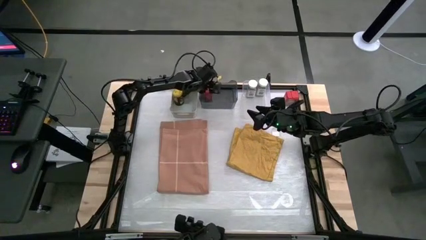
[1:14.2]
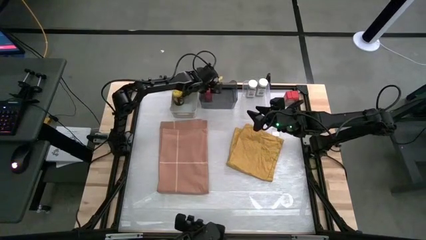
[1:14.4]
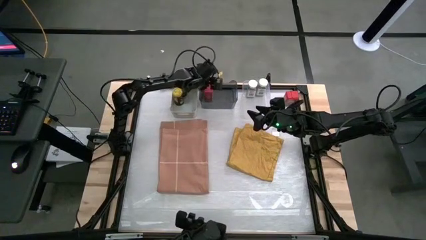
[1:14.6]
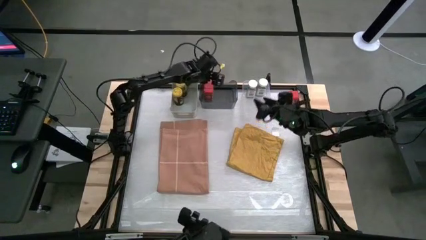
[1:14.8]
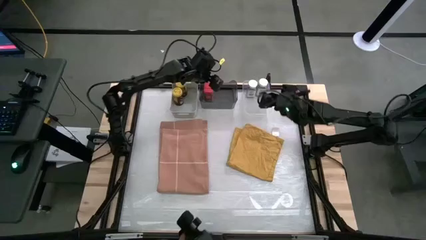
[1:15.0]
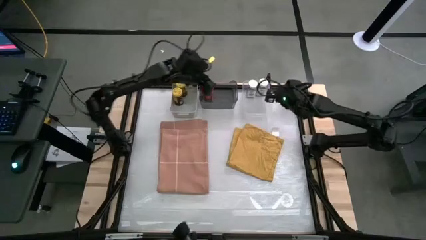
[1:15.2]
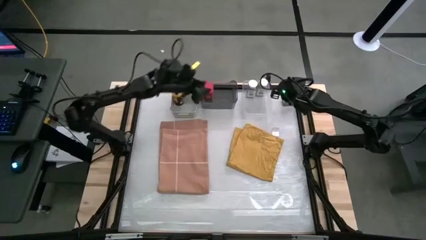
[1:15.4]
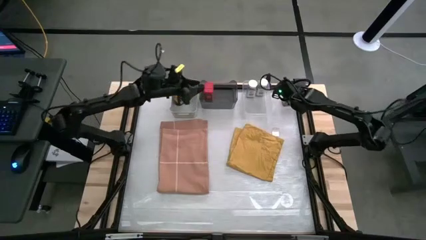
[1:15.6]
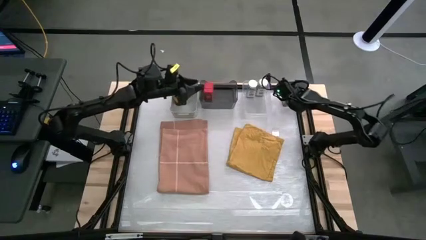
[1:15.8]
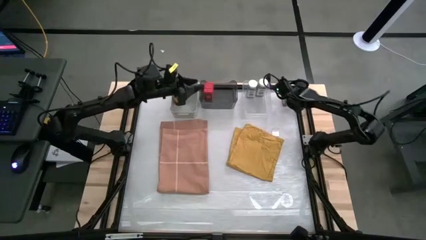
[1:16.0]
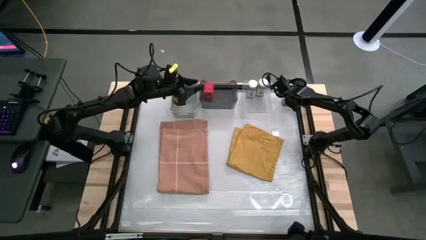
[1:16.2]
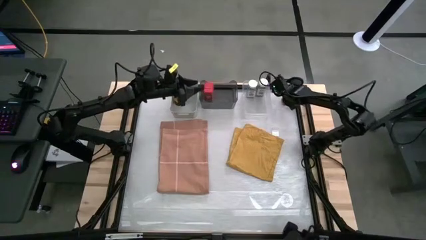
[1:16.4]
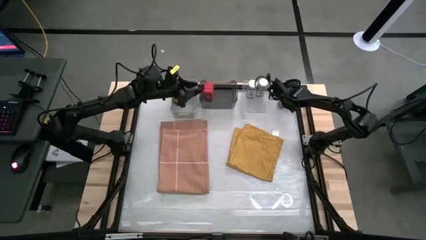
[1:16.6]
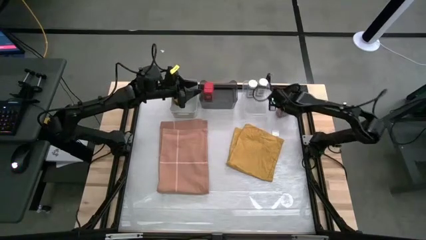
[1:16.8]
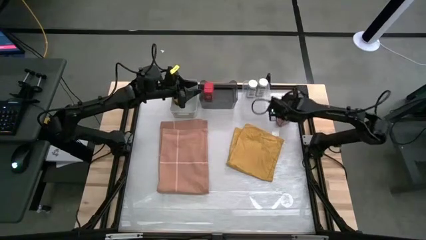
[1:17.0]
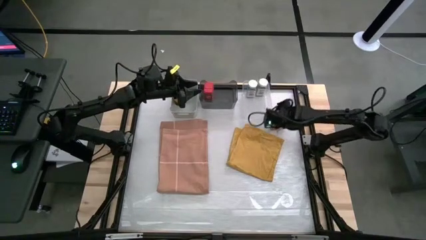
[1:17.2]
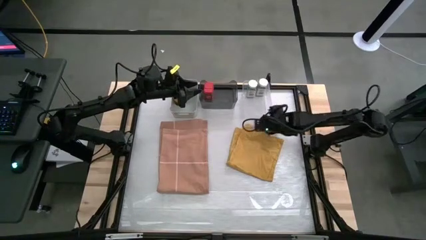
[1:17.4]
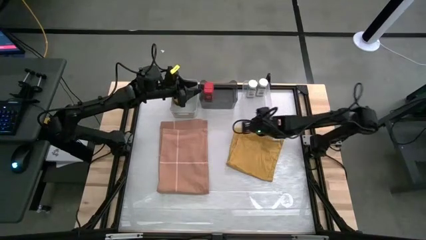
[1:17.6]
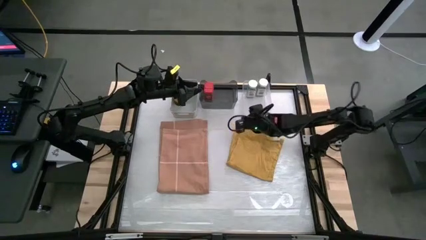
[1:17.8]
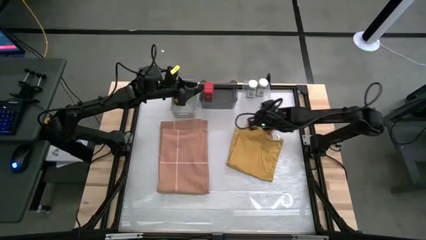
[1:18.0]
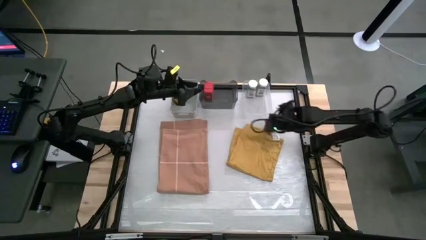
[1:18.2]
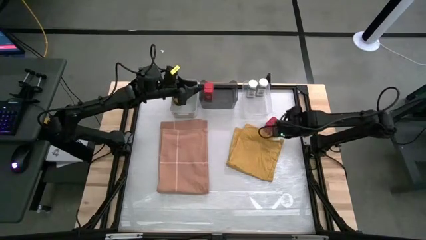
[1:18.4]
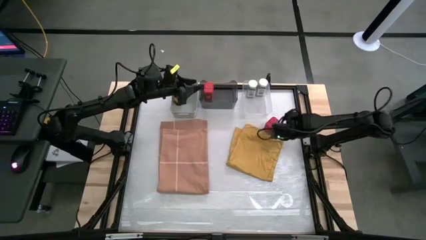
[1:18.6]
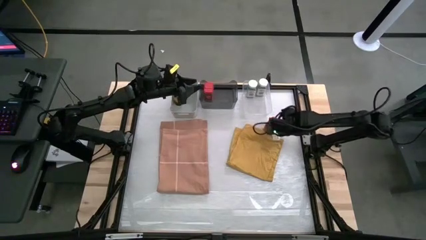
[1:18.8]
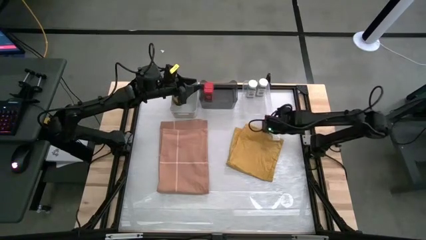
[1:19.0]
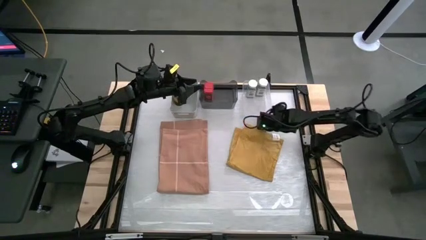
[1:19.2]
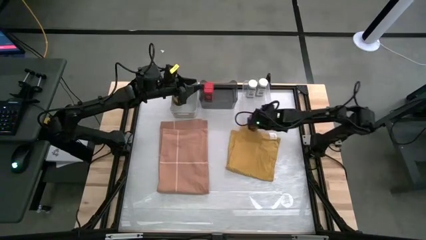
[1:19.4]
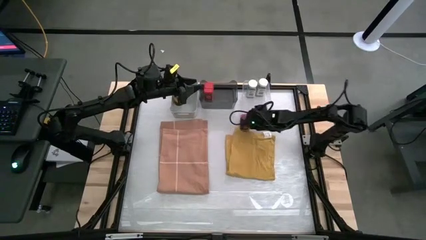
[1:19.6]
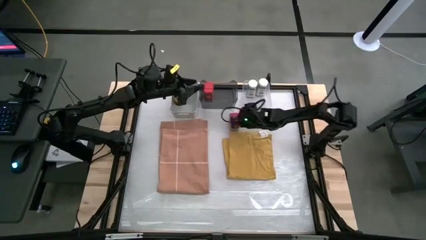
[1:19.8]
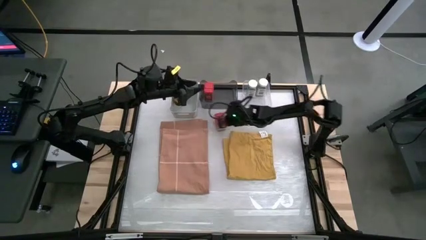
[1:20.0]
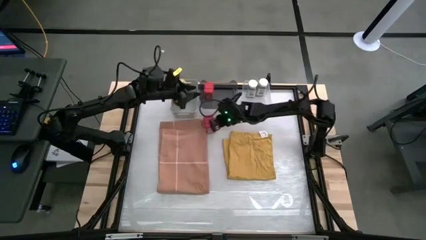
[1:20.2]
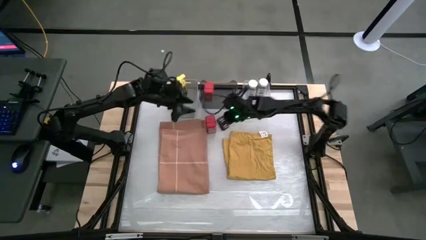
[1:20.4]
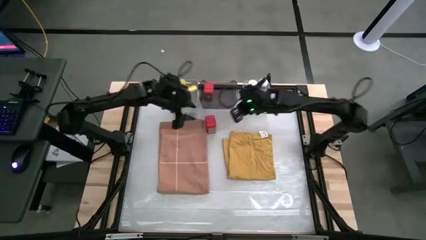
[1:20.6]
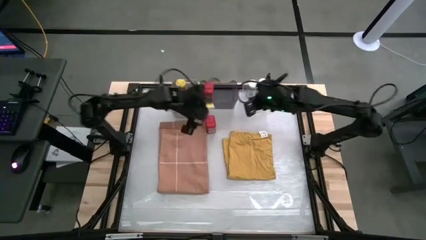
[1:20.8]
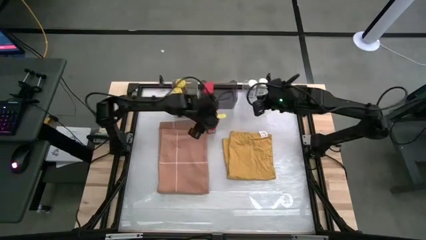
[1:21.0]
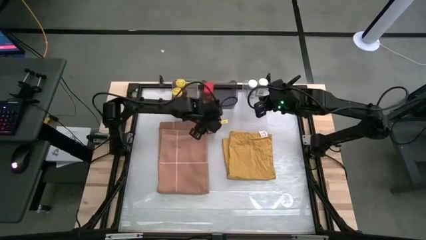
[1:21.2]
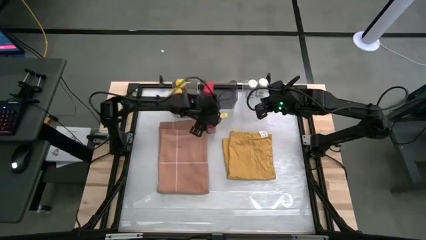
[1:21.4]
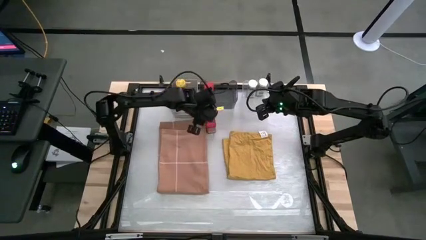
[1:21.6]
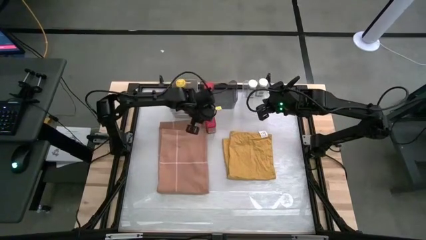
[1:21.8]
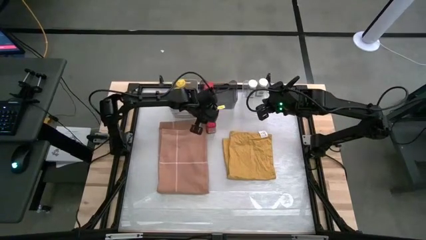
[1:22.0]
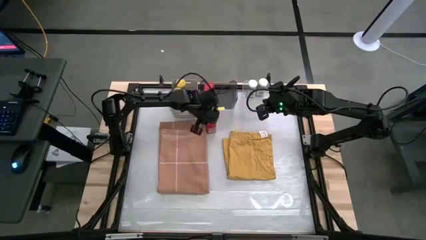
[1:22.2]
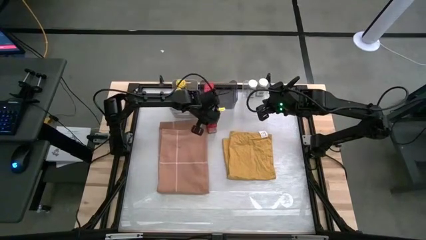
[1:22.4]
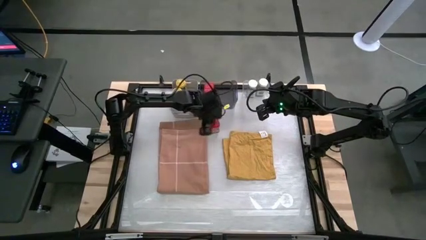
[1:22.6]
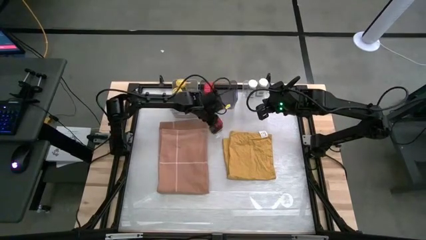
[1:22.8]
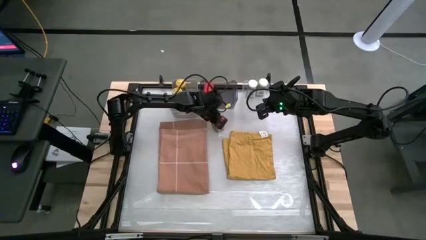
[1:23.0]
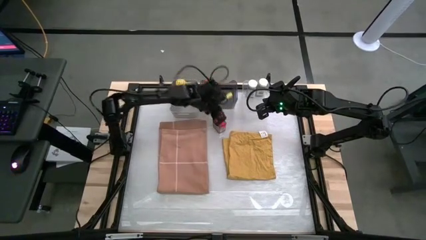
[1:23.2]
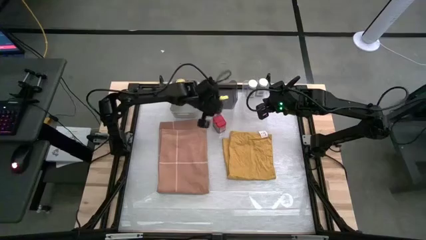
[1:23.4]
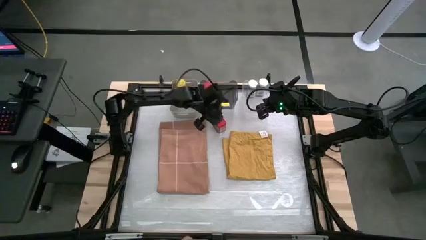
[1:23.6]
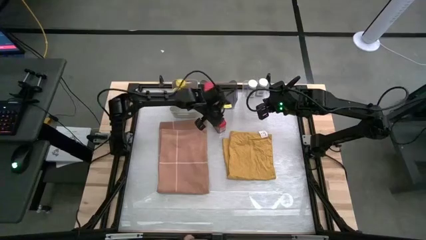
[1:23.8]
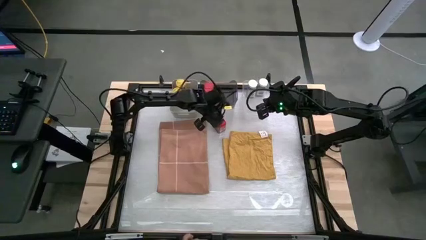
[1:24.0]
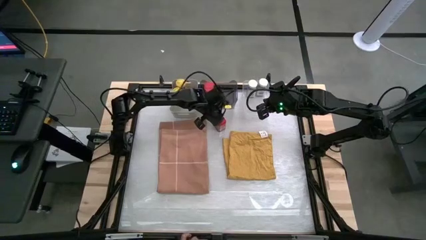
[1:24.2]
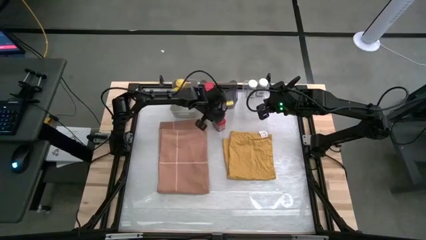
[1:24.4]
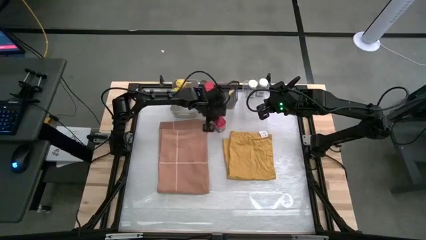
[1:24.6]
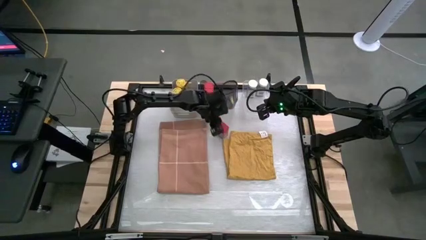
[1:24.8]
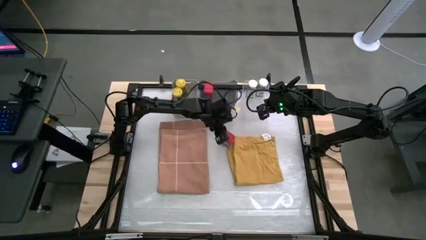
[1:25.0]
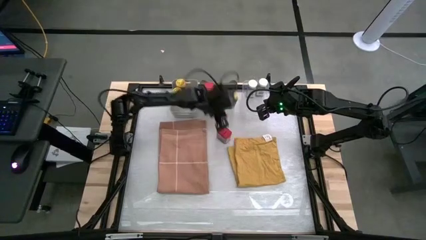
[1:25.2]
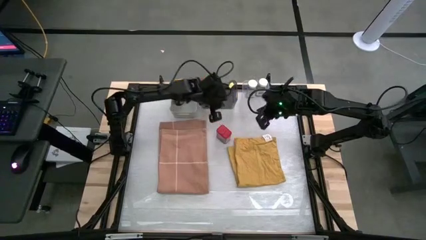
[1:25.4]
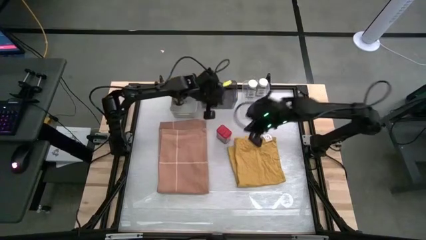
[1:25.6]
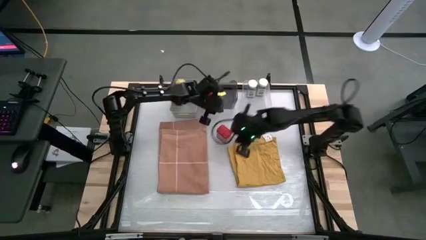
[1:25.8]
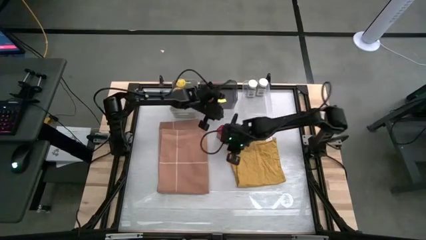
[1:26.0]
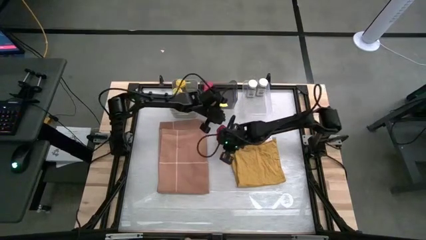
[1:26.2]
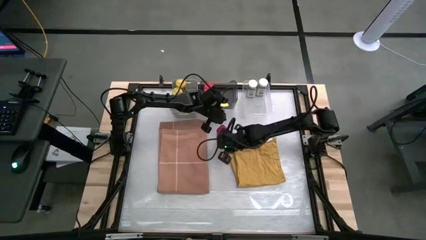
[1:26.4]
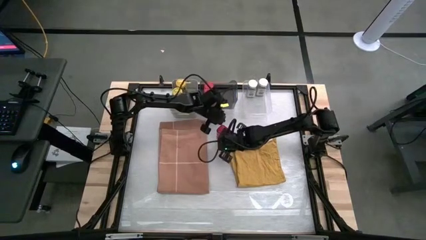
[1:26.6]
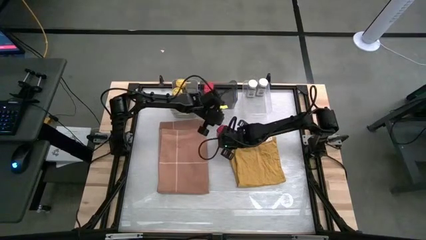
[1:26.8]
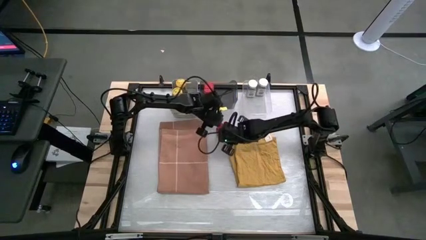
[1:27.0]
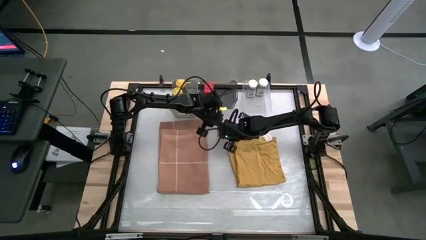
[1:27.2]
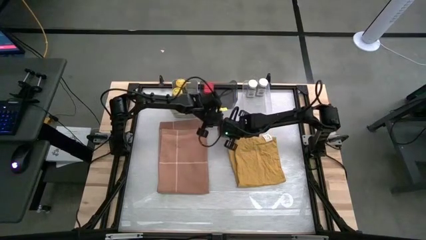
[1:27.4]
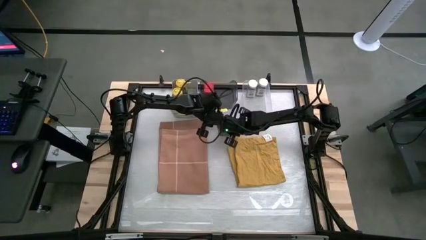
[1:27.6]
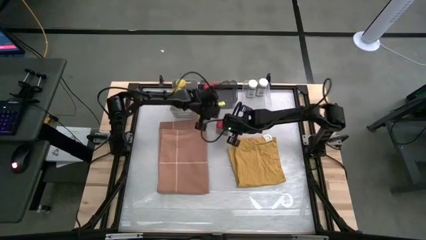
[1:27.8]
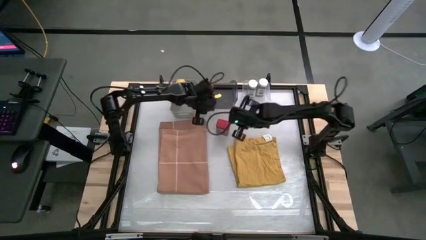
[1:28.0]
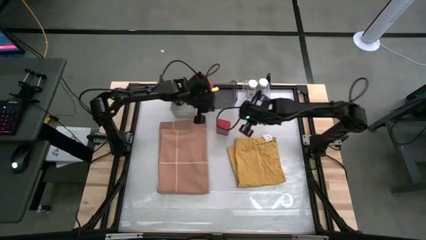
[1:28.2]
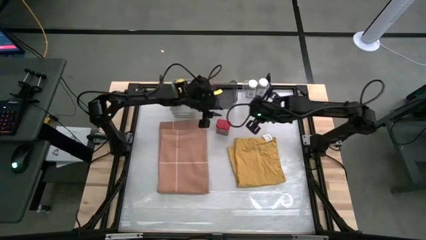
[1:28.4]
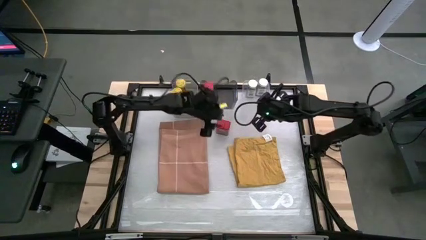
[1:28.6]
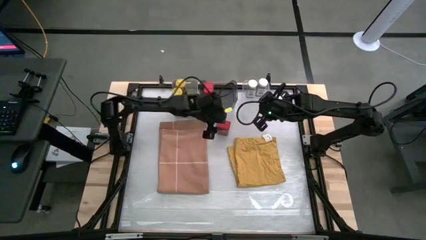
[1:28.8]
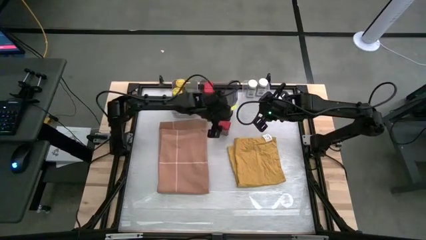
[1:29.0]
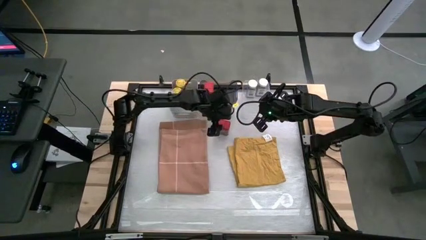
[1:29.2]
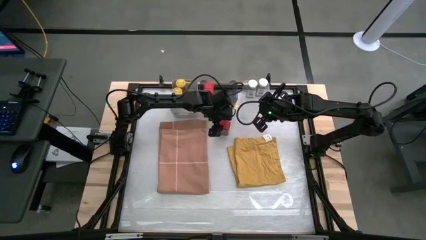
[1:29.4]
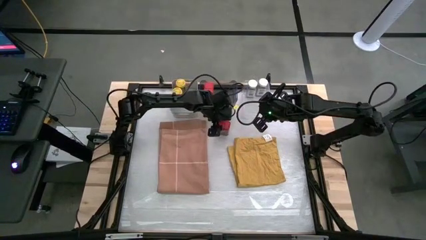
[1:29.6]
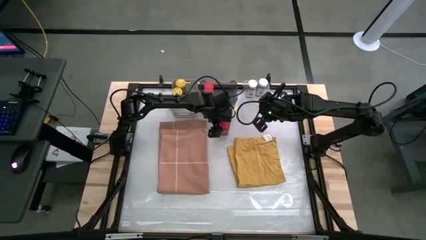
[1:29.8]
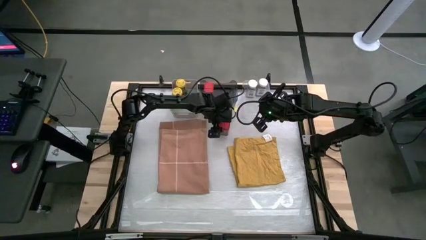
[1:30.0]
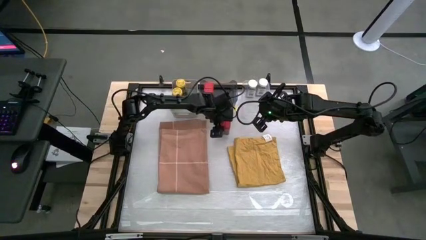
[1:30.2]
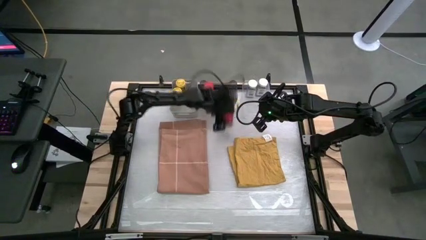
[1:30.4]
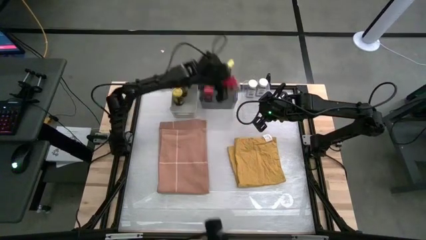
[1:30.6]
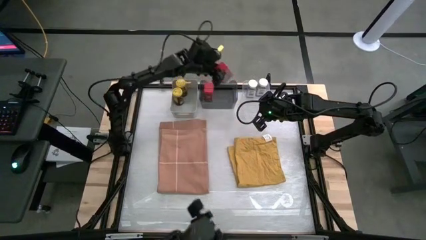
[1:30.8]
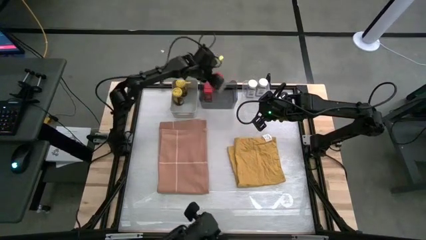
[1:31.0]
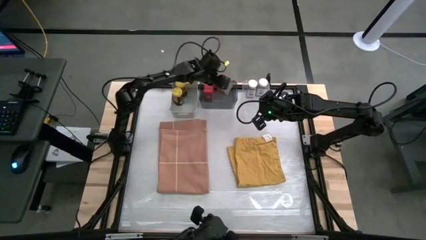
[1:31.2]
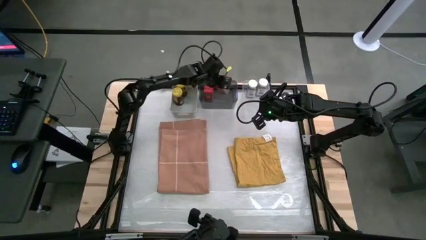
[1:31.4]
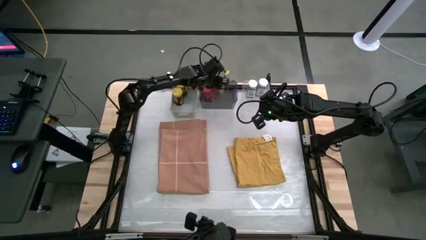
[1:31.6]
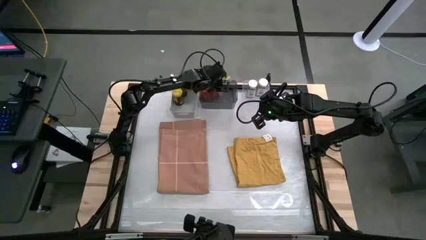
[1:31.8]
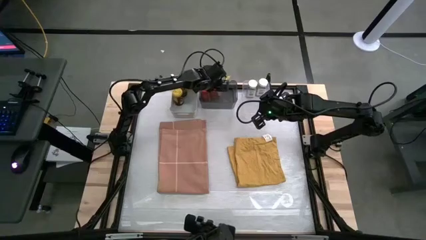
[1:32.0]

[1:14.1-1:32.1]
Task: Sort spices by type
Put the red seasoning can into the black transparent bin
